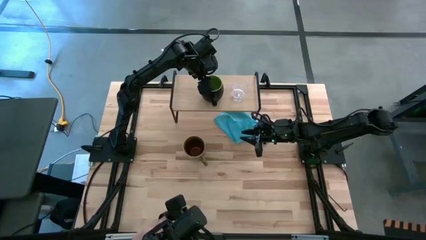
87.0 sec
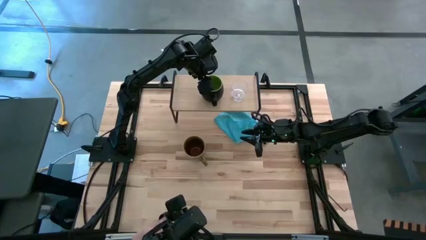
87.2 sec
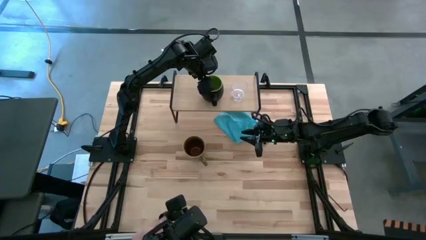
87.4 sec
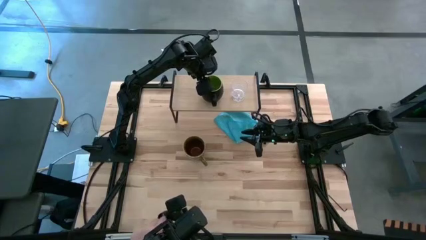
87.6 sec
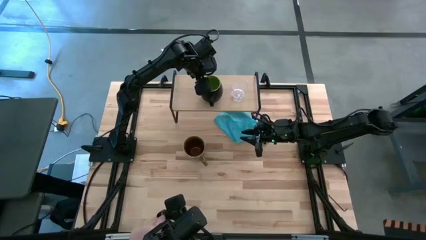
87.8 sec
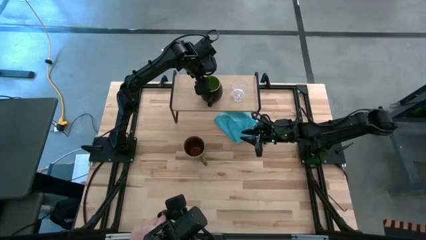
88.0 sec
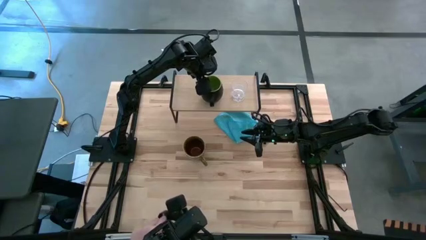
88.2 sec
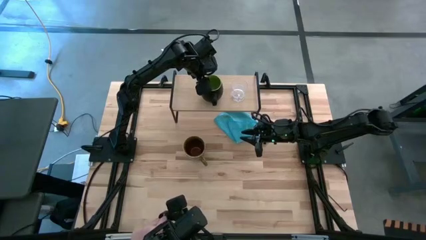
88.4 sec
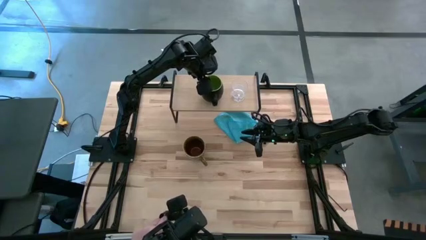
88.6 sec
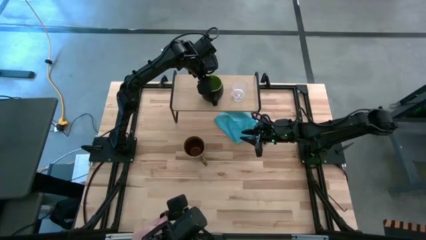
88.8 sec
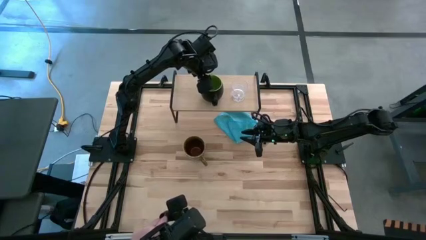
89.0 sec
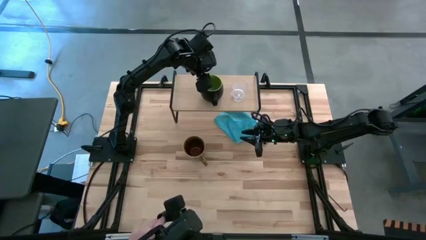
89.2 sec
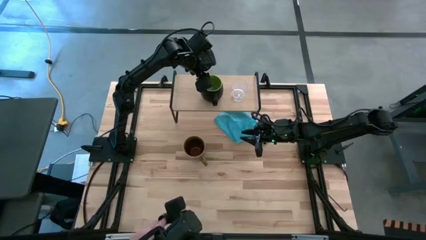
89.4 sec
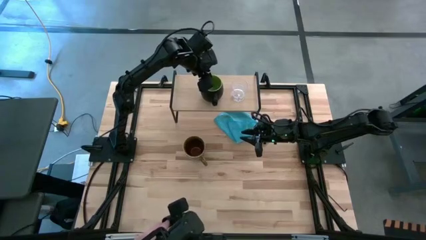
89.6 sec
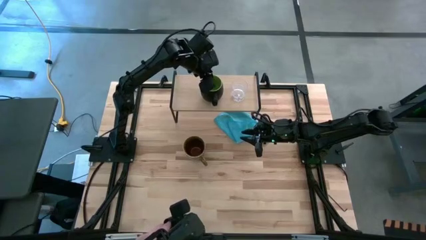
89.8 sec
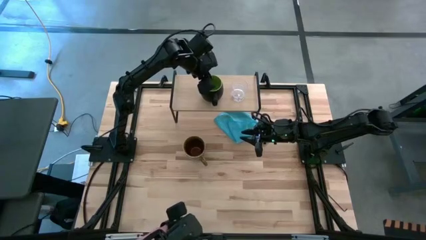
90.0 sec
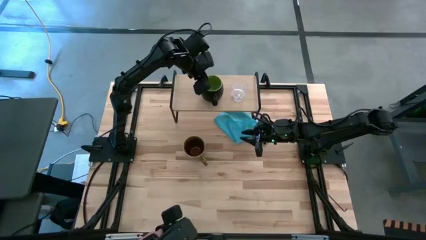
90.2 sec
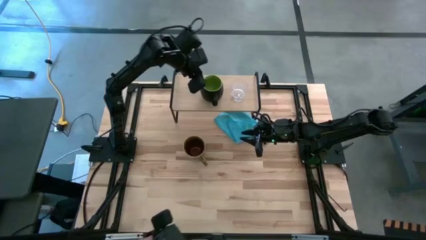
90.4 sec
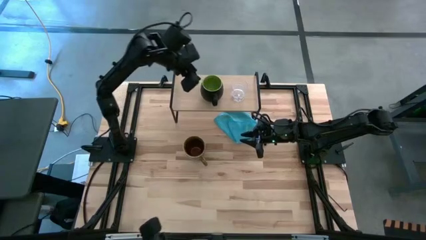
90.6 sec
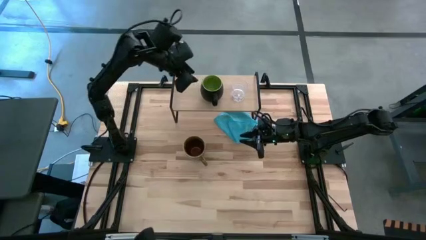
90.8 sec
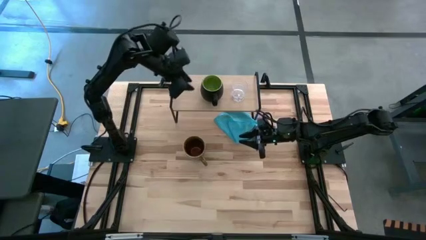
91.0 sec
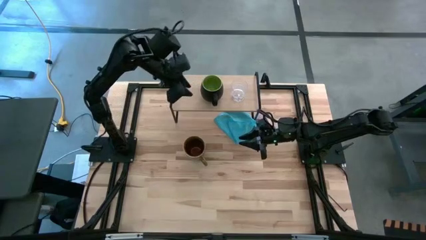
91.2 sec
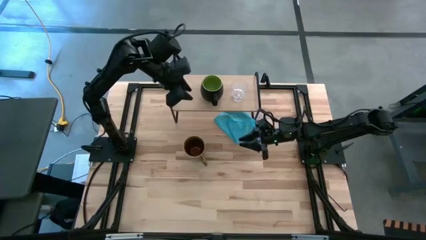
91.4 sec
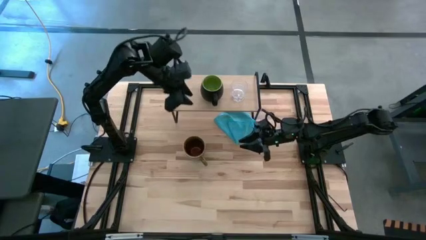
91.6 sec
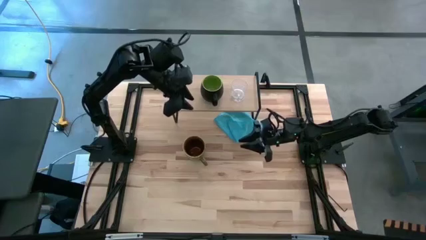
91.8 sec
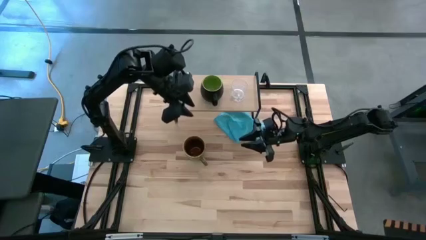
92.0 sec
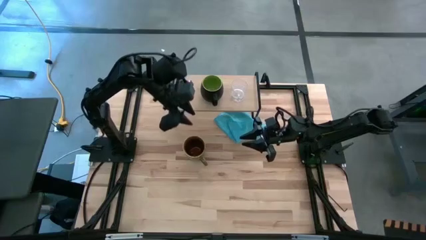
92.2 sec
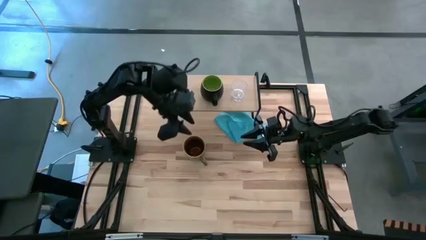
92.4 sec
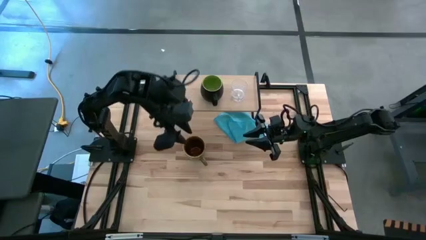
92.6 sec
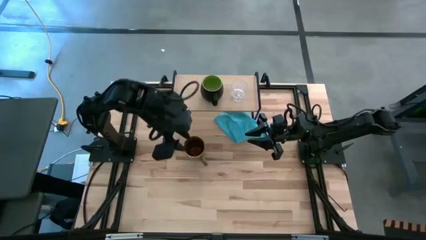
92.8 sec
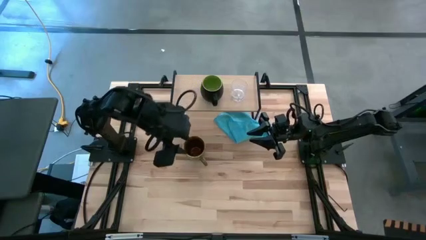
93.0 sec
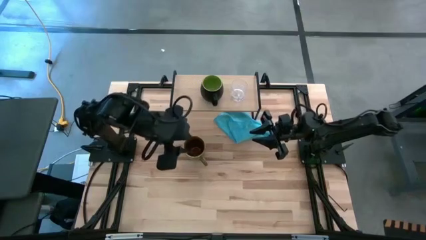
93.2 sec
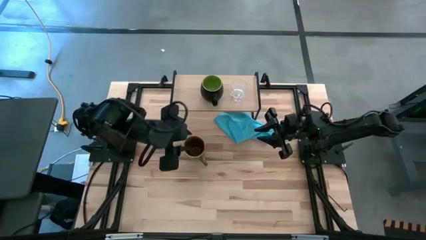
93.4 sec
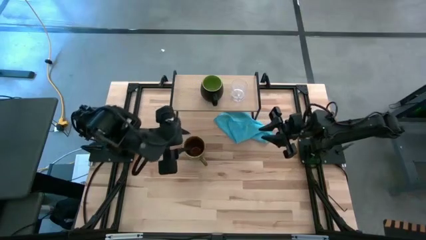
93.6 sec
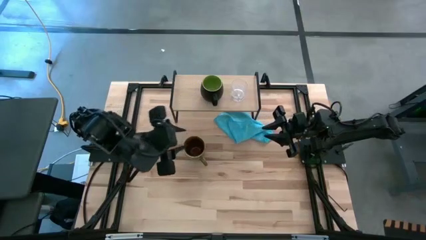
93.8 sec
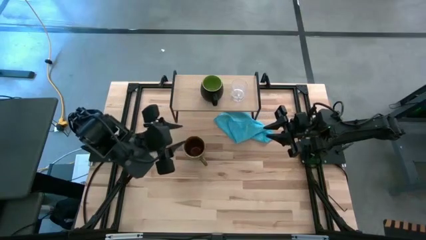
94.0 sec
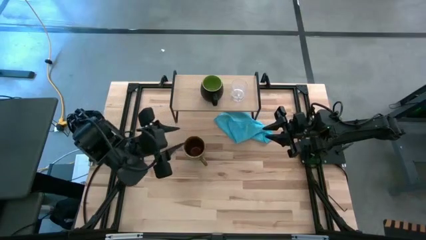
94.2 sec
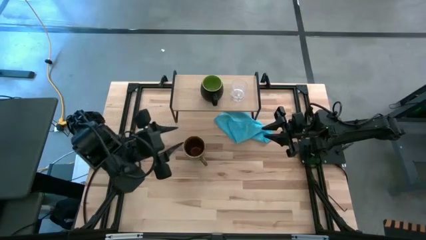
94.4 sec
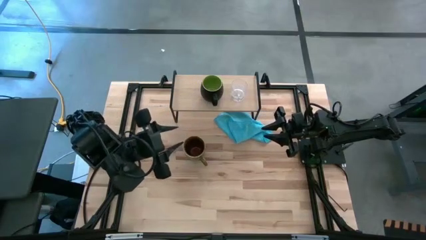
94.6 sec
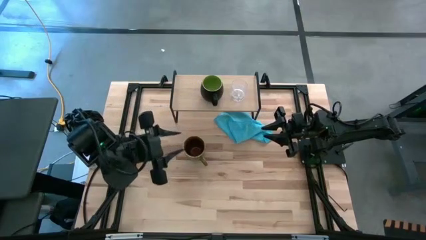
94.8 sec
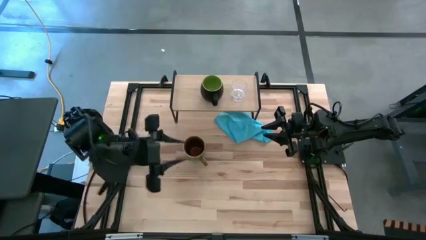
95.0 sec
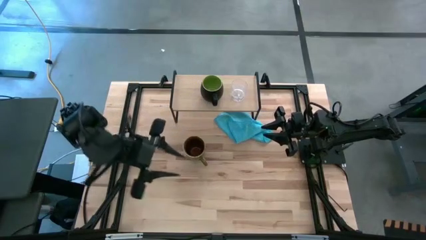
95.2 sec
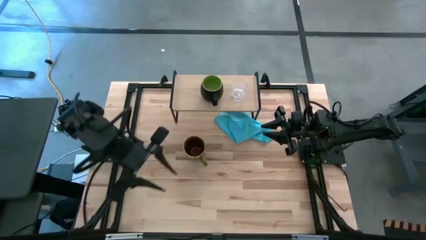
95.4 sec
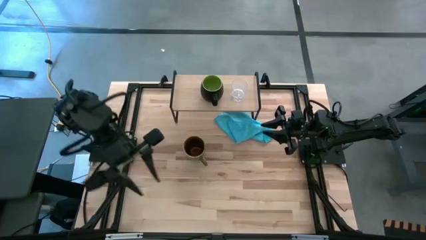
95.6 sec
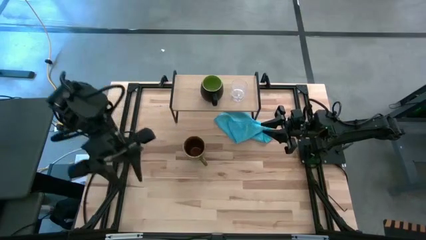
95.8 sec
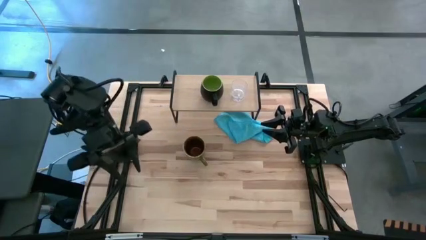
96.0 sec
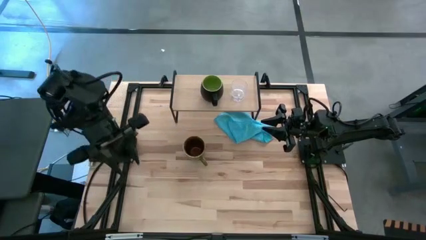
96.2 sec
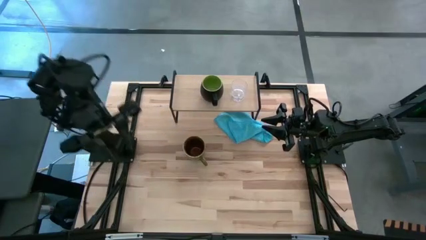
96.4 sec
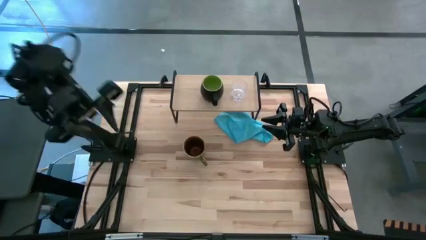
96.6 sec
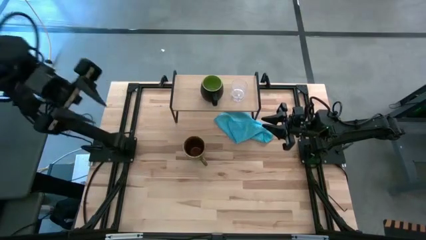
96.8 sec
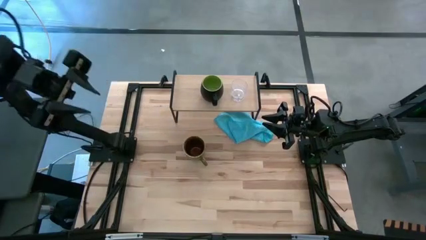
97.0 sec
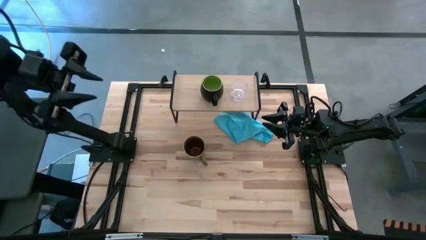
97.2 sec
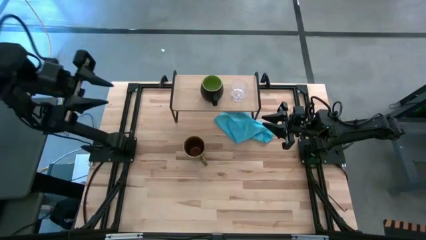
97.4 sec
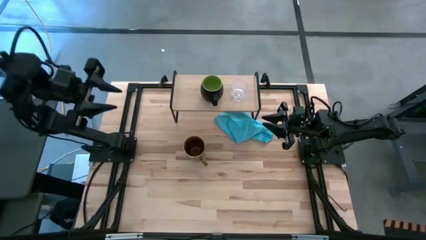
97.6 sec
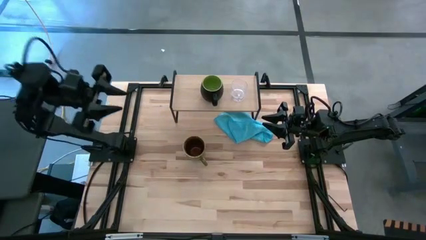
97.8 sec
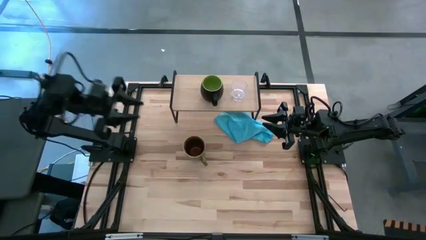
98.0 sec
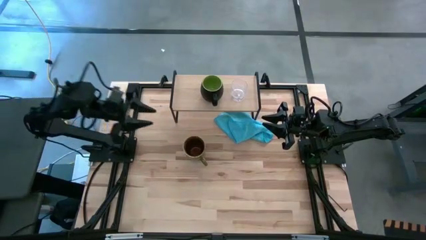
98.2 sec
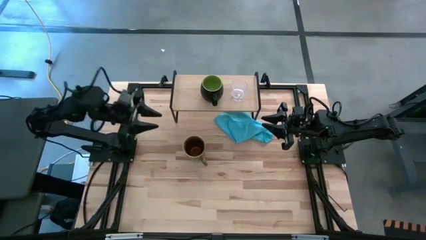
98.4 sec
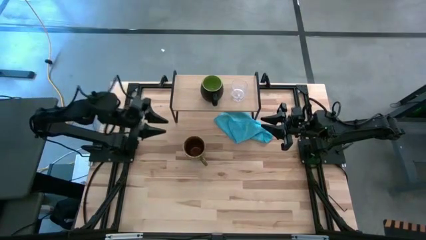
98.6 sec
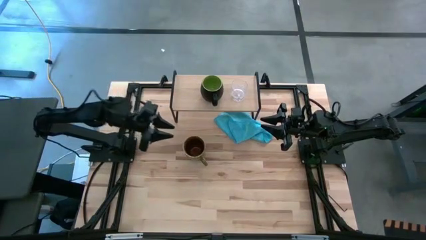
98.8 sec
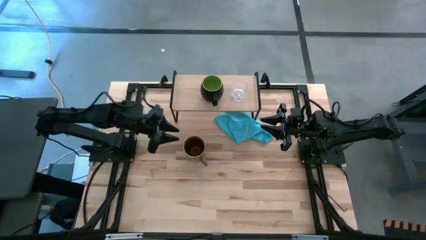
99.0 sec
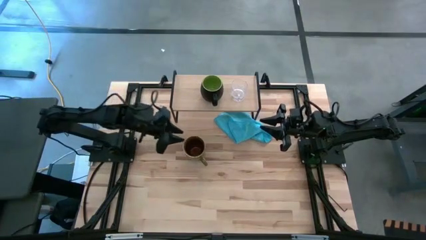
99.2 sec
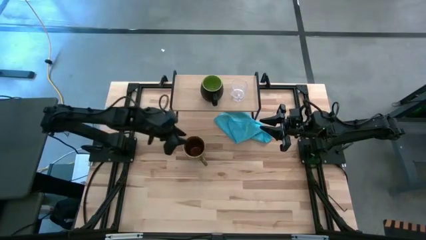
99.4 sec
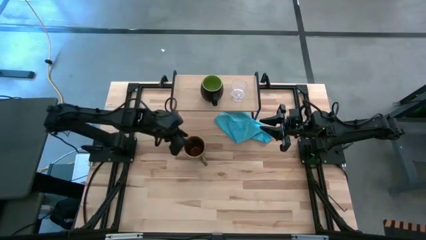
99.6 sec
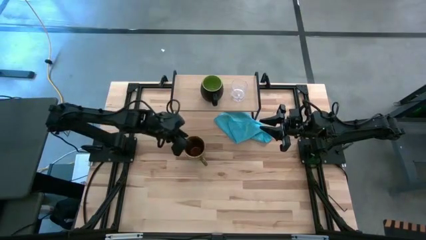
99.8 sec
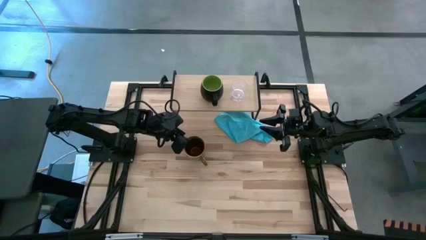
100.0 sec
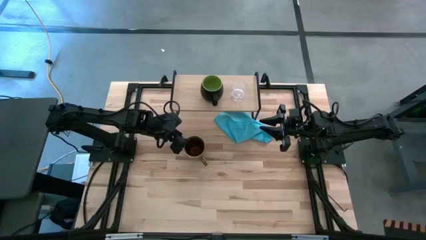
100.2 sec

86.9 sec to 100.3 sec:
Task: Stack small to large cups/mugs on shelf
Put the green and blue mug on the shelf

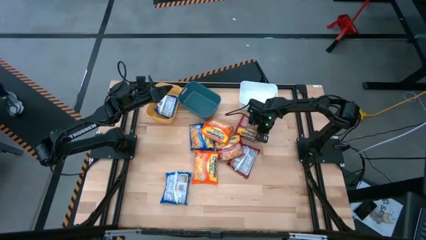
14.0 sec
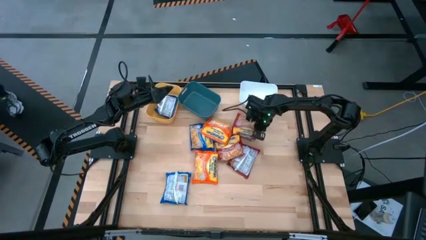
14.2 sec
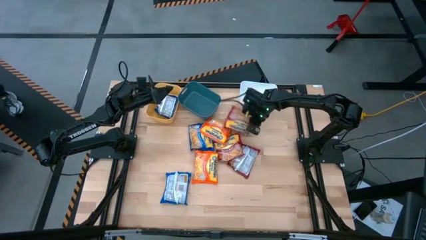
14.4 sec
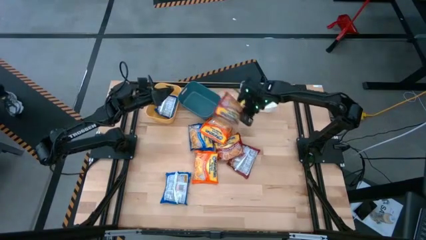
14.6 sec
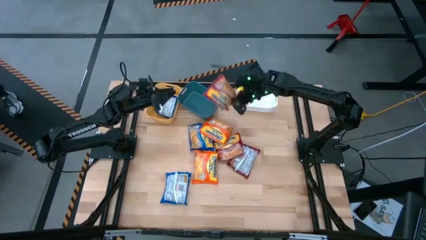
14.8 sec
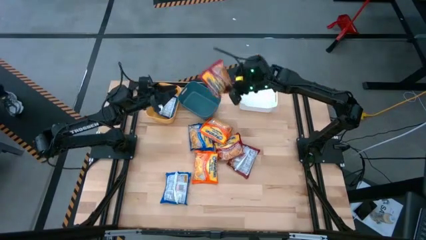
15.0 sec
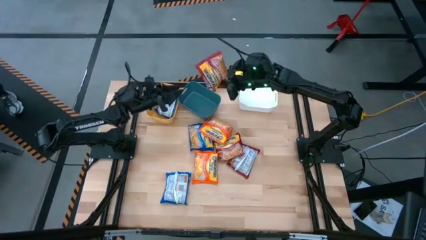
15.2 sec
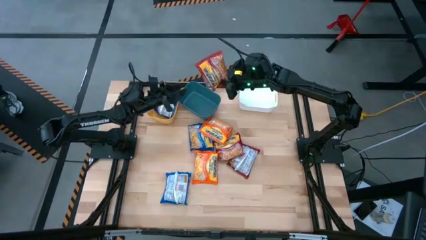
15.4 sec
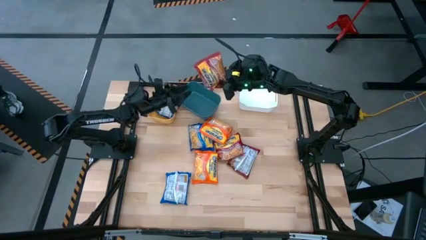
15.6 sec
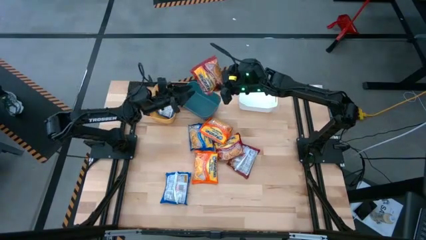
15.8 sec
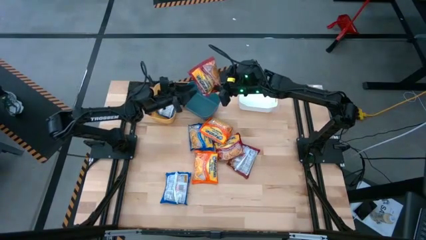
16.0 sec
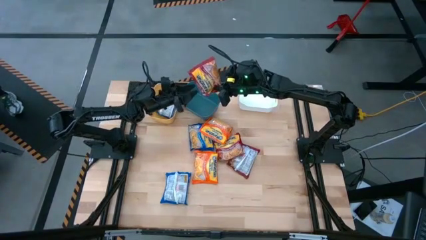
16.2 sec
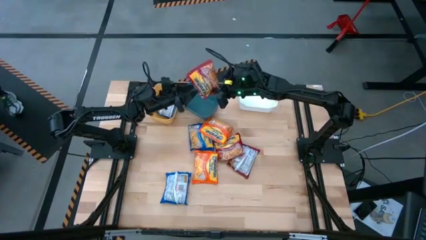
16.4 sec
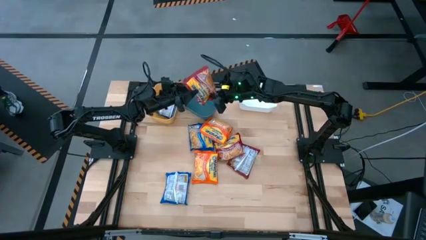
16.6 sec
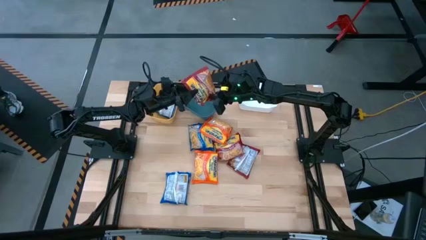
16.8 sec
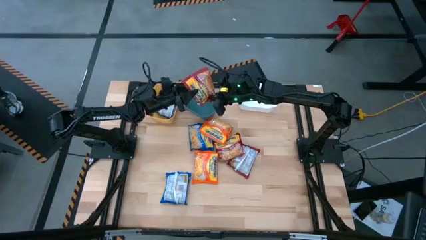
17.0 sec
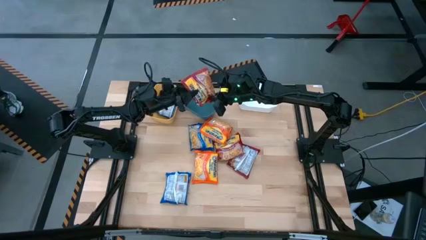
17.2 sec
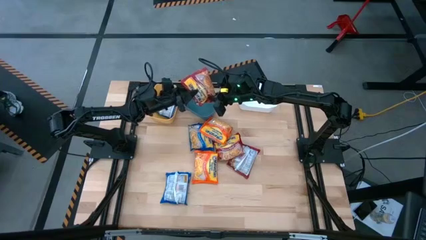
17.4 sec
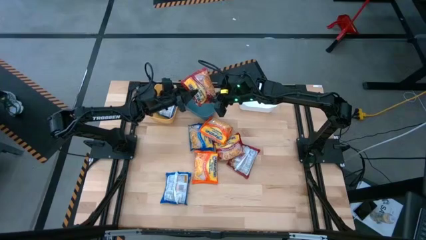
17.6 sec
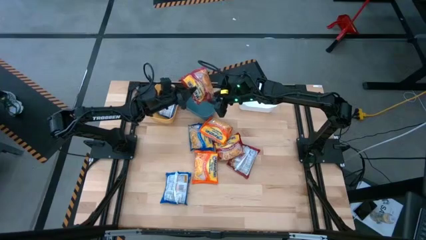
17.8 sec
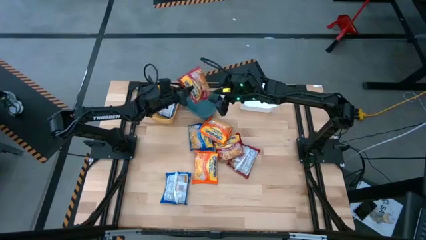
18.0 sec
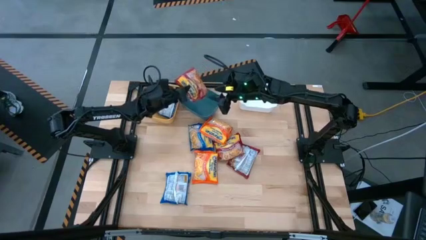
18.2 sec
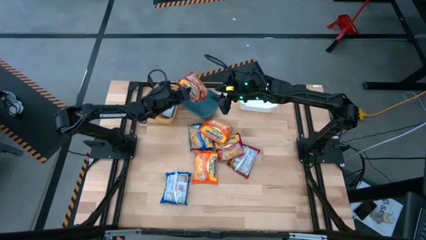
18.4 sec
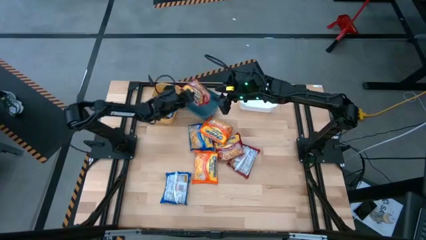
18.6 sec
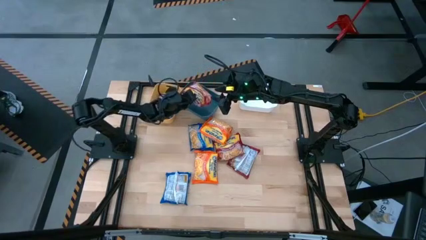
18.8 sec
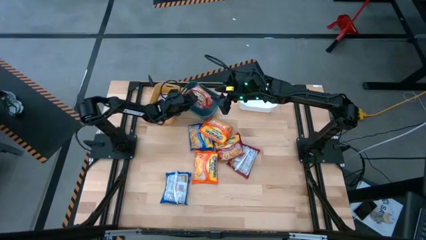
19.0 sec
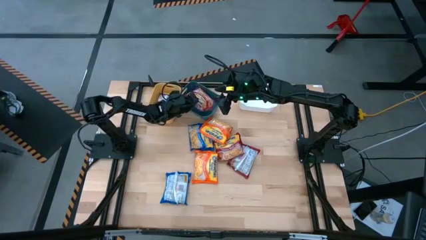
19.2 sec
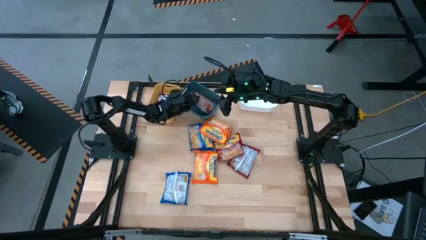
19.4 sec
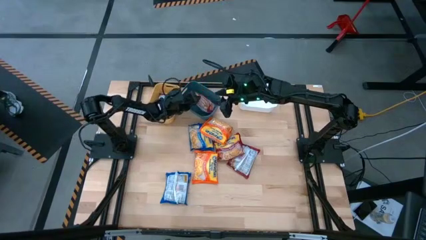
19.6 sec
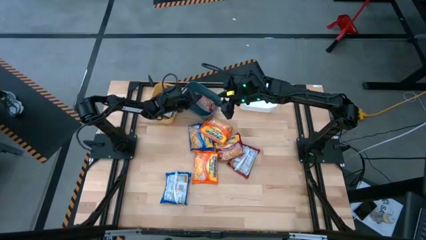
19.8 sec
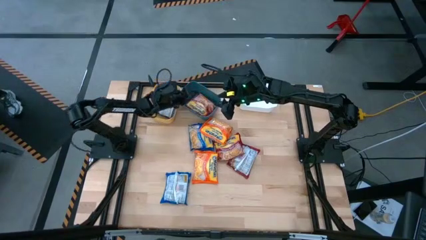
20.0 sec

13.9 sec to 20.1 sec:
Task: Sort Maruchan noodles
Put the top right red bag into the blue bin
